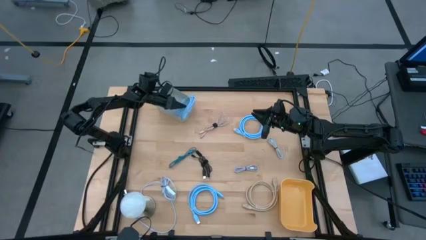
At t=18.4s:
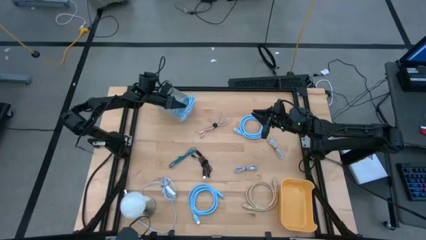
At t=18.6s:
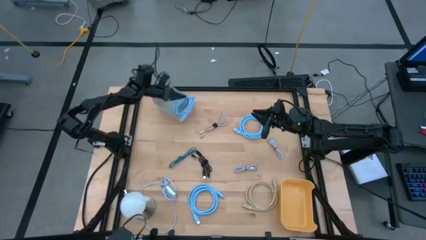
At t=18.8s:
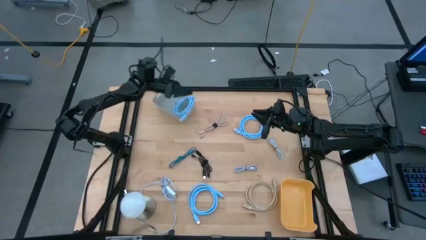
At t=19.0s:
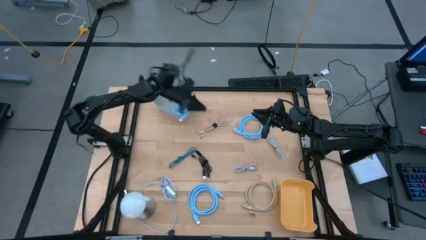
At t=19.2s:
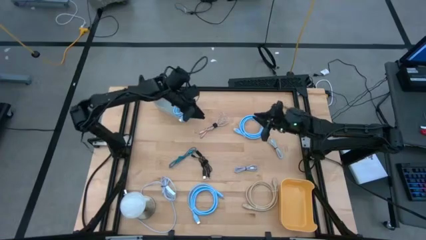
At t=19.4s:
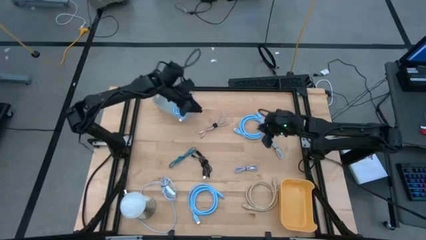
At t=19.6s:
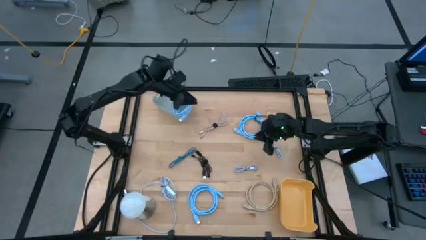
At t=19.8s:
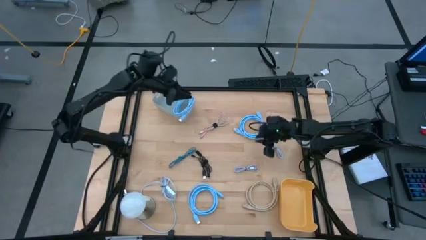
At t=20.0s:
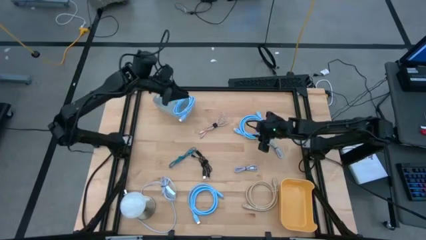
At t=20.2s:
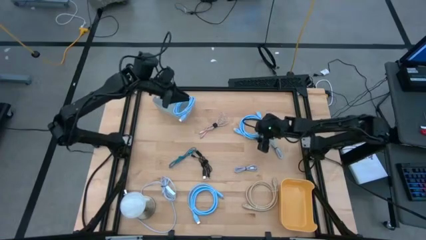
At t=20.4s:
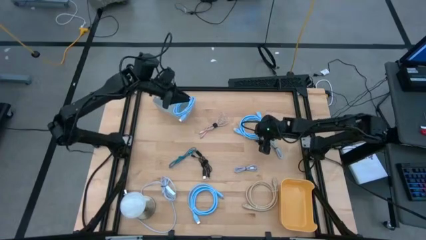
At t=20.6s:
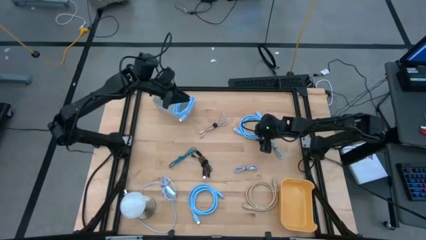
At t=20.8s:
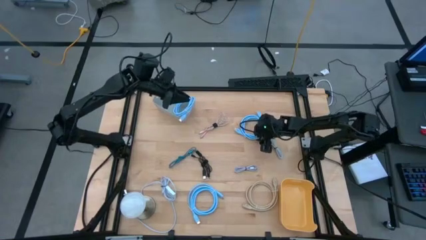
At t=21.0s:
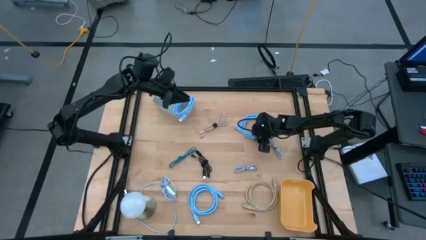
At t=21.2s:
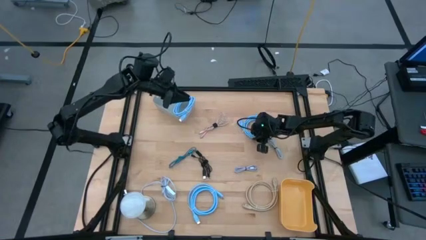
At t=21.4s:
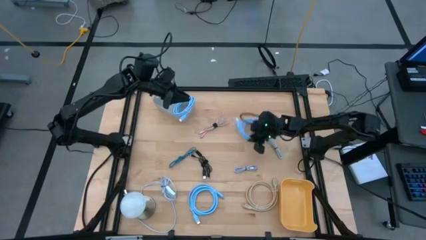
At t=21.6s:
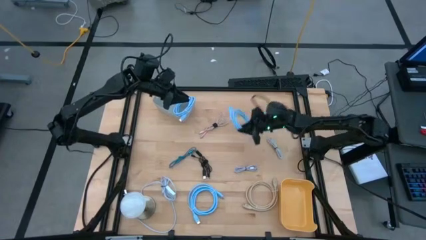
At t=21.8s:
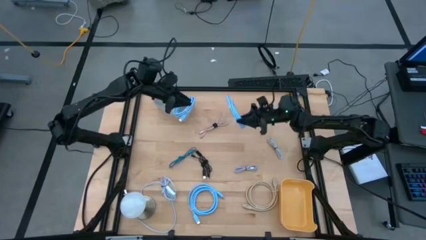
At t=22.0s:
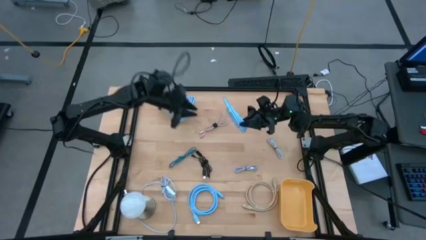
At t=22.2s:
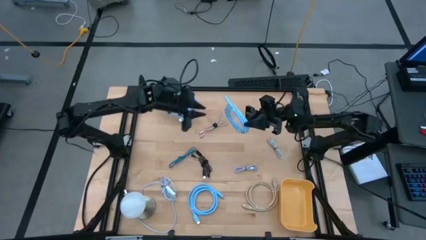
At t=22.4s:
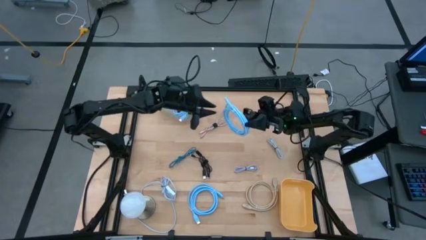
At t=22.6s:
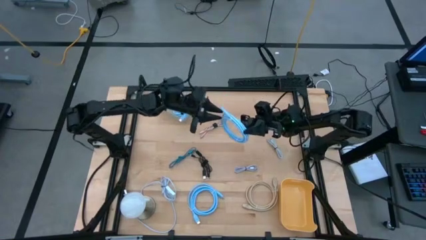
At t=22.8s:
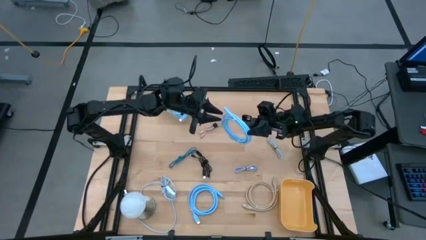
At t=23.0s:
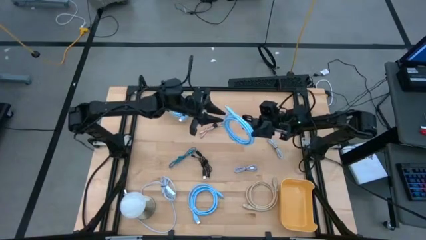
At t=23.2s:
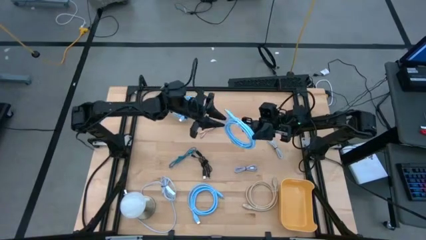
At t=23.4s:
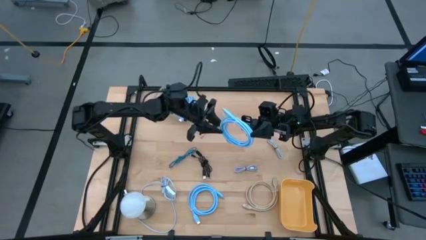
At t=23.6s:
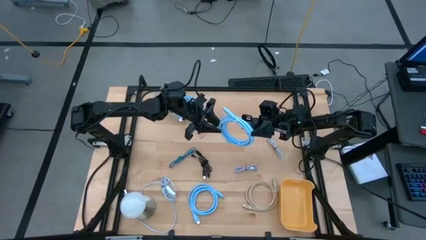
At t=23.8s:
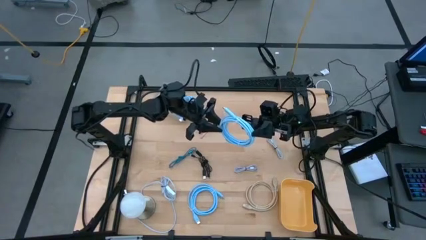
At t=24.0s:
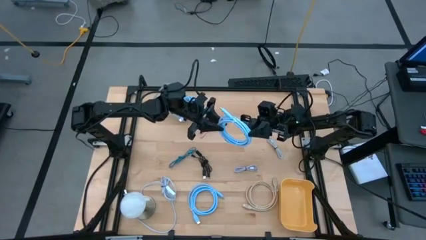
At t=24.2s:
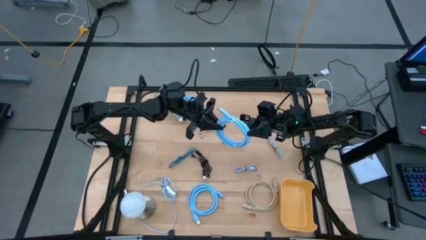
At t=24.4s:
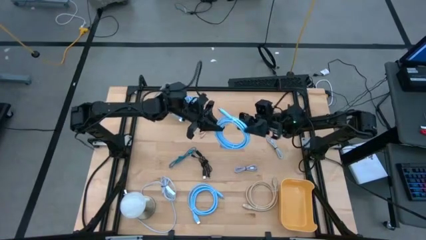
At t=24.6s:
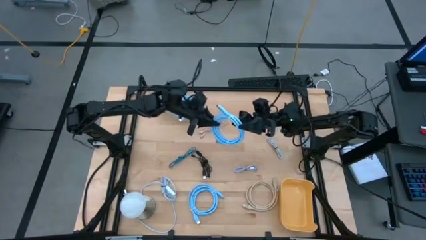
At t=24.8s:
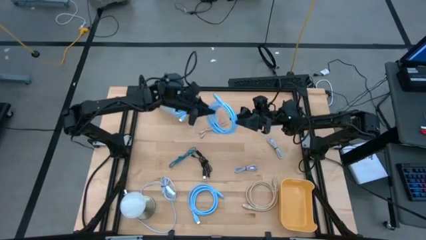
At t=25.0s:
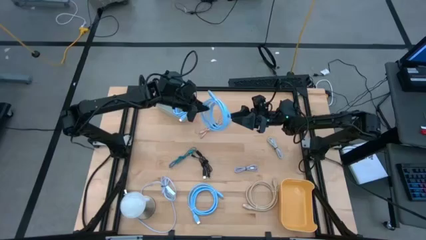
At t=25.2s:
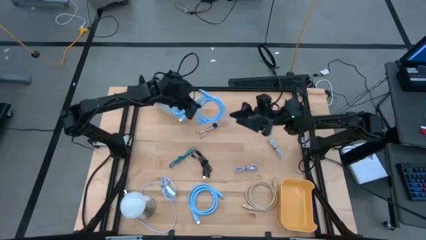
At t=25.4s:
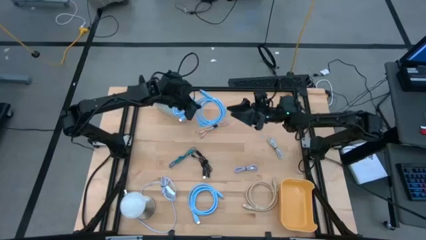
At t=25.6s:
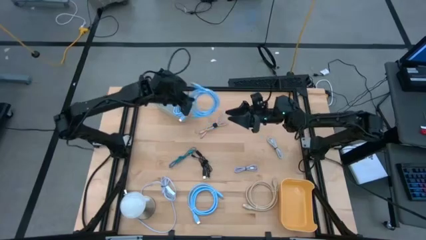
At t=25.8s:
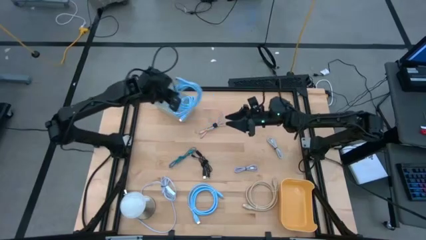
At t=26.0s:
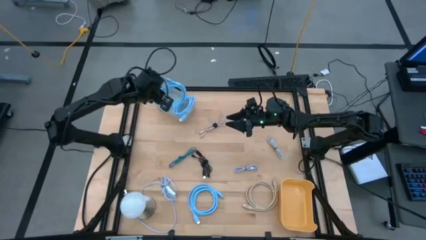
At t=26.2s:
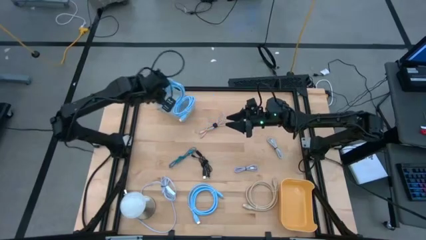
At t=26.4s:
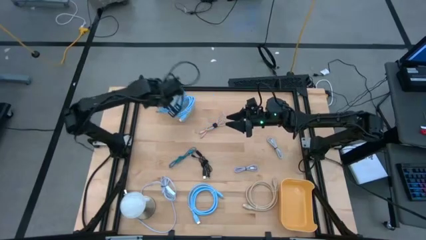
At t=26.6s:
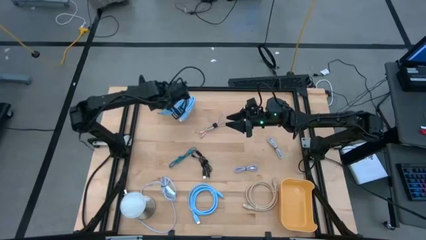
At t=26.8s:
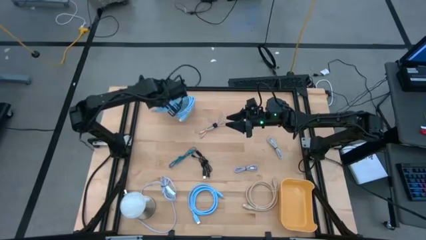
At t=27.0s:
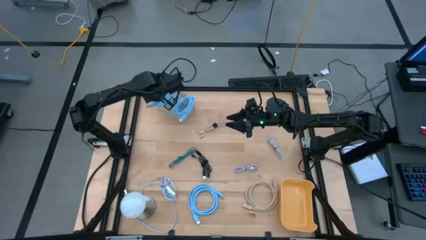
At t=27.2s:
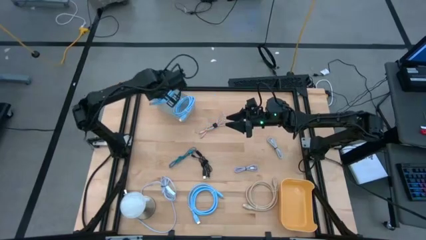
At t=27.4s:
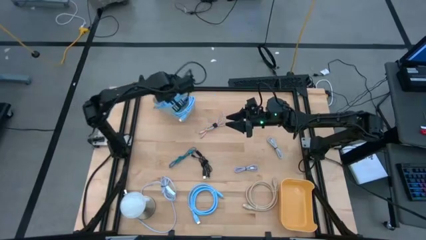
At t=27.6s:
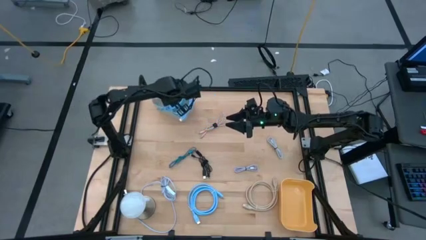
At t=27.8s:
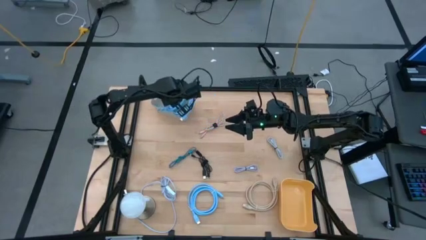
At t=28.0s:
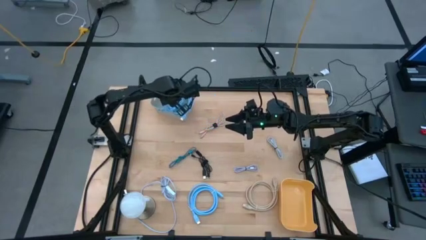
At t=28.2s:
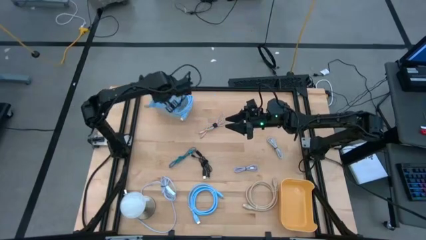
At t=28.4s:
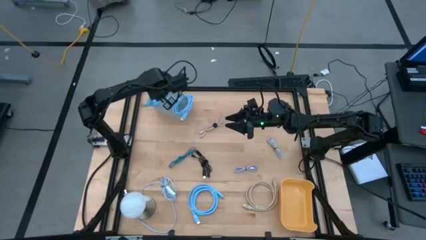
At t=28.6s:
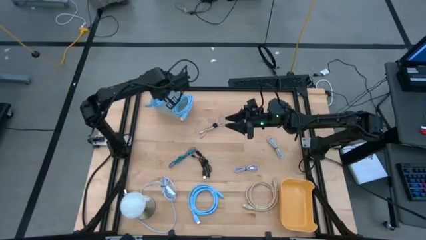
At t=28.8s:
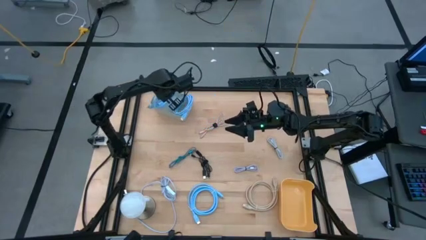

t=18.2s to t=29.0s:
Task: Pick & Place USB Port
Put the top blue HDMI cable into the gray bin

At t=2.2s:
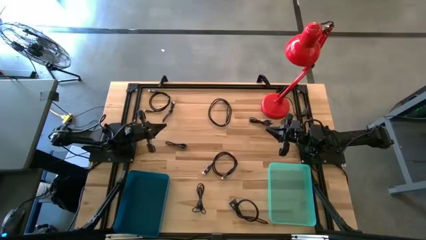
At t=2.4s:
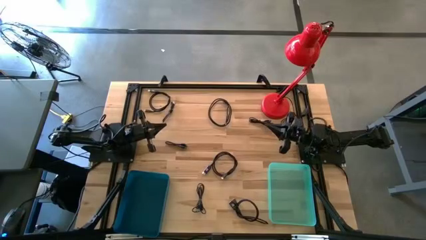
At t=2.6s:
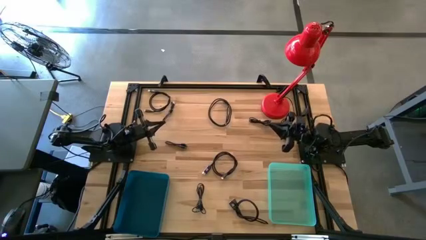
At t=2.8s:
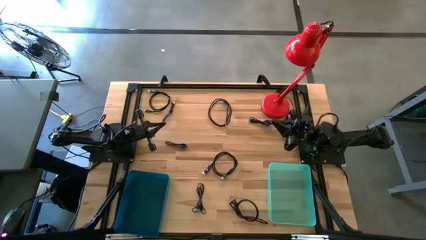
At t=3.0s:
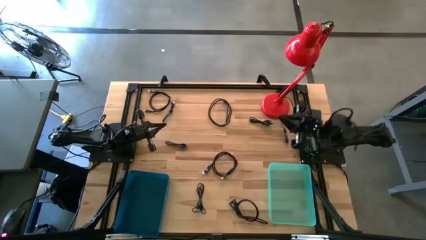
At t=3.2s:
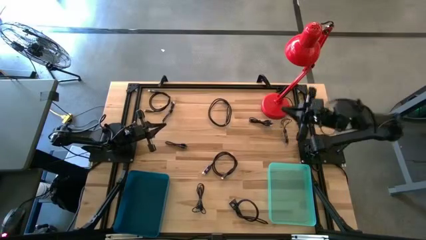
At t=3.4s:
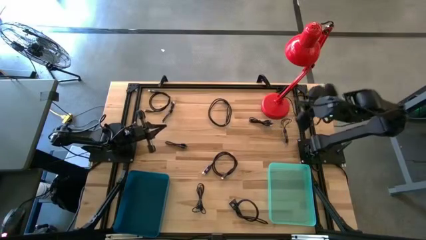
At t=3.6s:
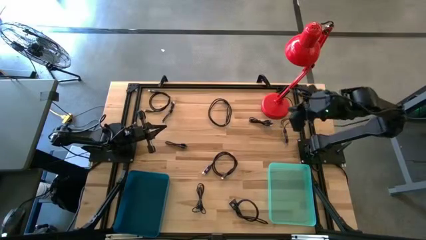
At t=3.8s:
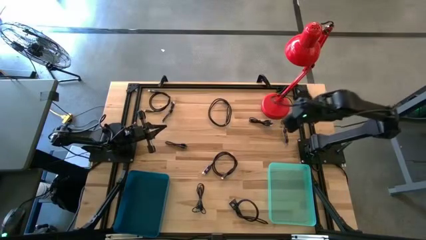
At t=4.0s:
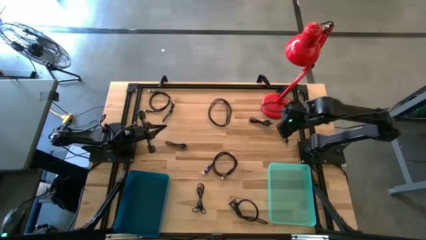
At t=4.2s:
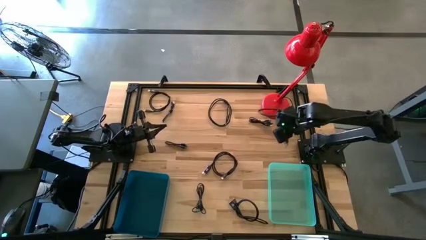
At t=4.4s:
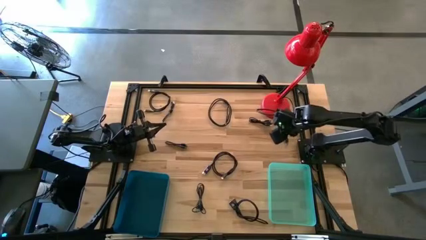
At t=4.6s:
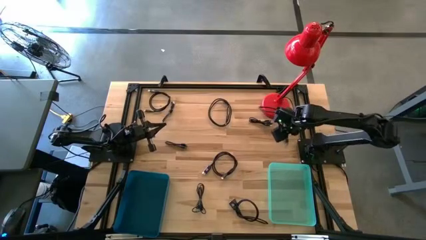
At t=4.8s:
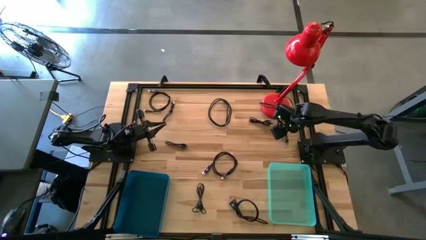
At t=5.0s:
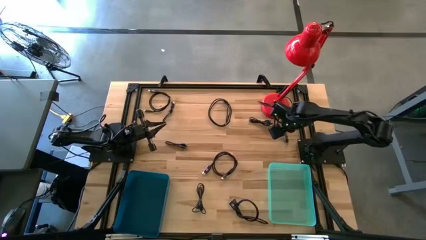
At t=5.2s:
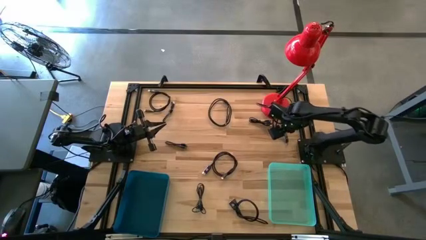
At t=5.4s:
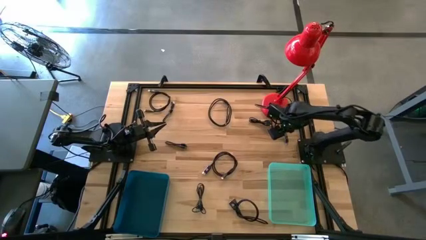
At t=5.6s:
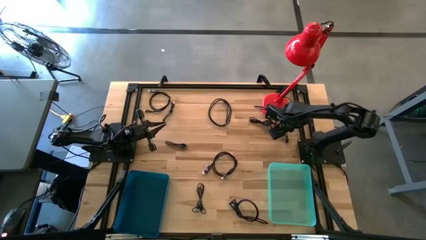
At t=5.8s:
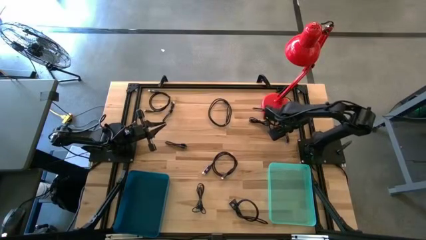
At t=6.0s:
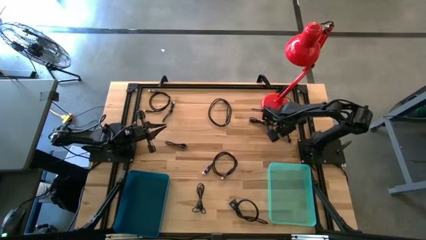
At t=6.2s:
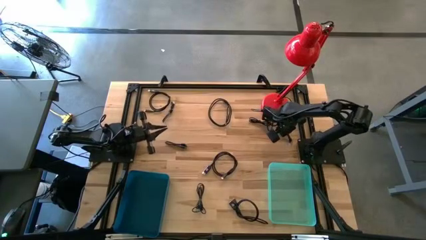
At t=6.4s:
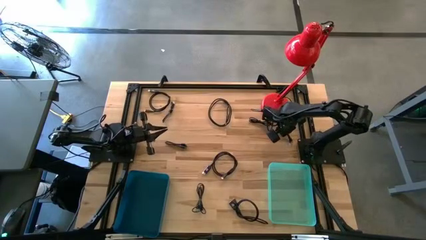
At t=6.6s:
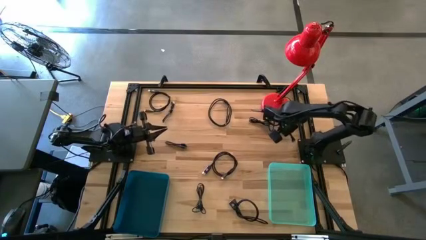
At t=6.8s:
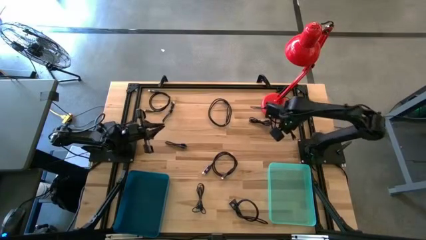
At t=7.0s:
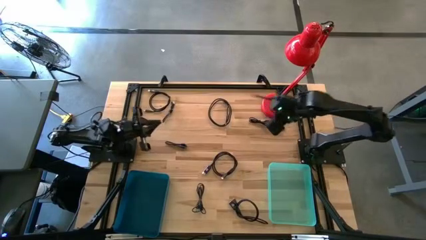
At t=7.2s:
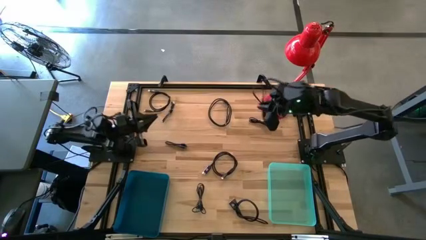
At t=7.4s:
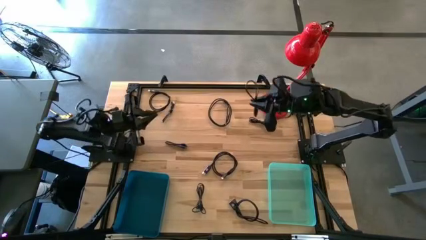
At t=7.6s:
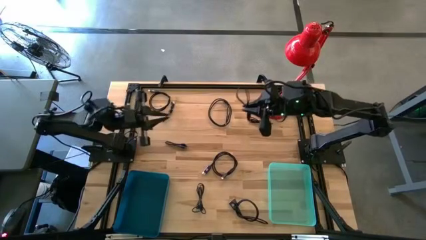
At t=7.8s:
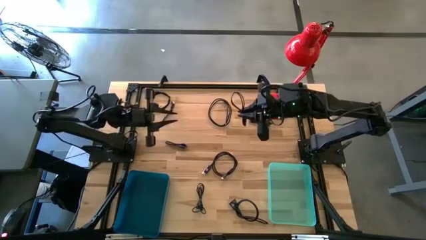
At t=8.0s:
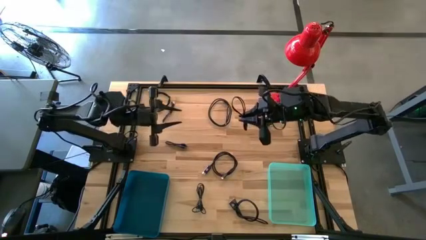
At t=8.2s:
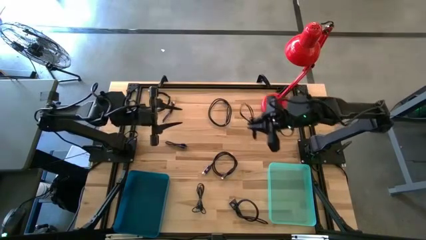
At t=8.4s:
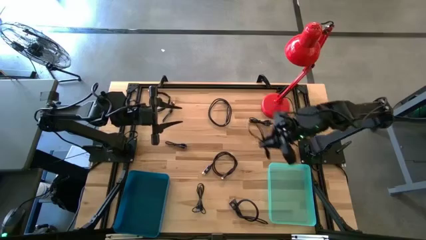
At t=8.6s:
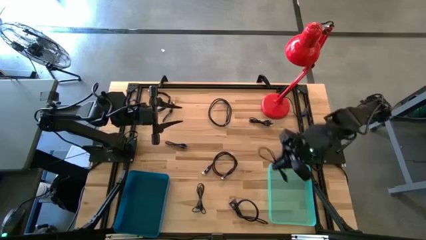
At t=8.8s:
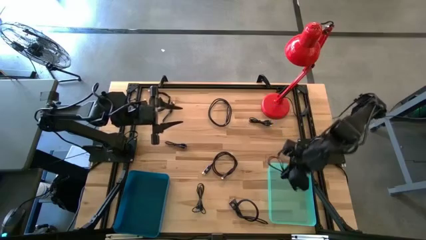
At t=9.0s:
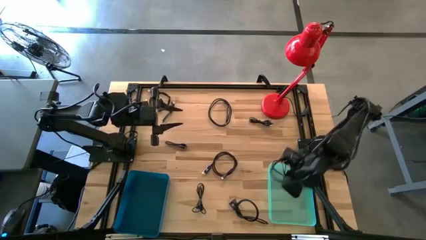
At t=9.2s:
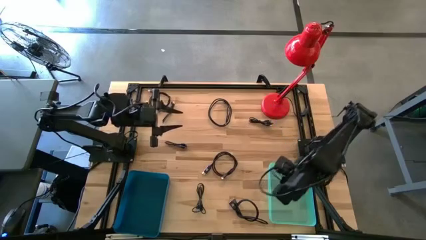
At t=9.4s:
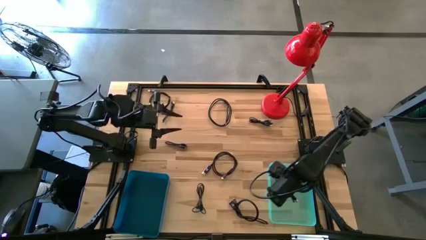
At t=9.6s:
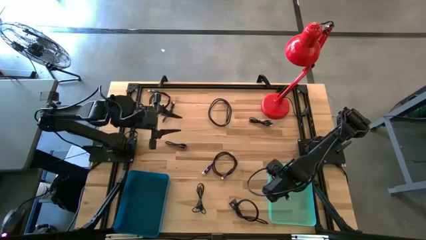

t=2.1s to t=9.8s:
Task: Pick & Place USB Port
Put the black charger cable into the light blue bin
